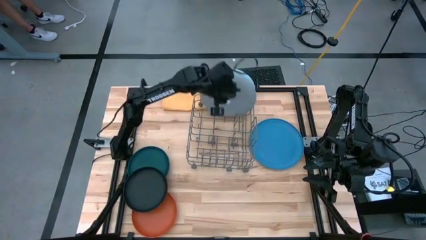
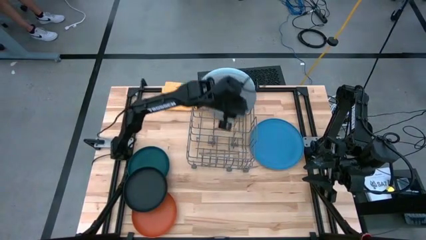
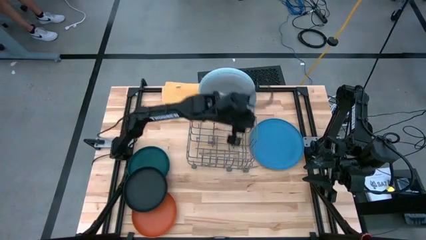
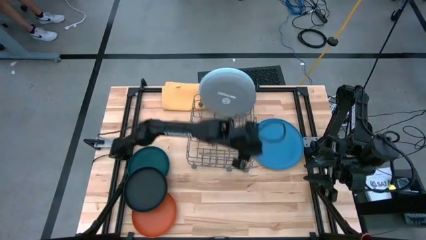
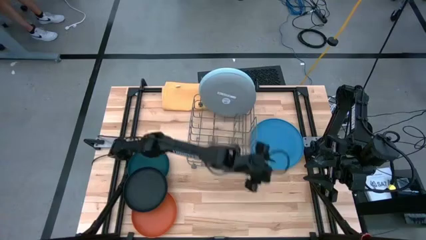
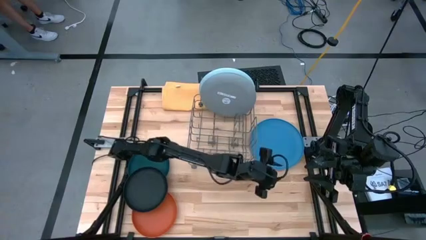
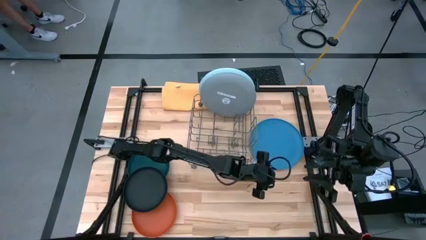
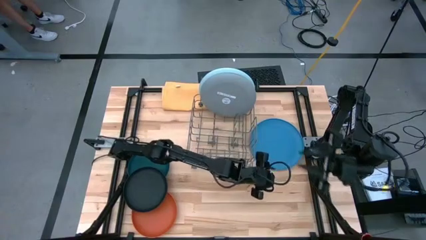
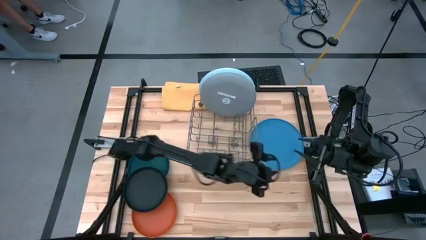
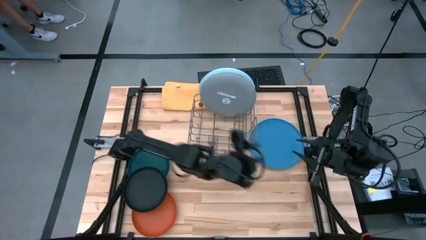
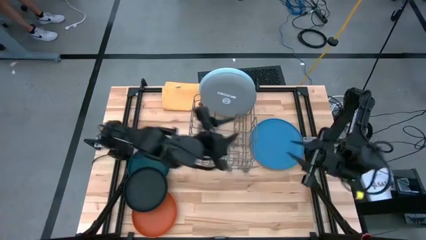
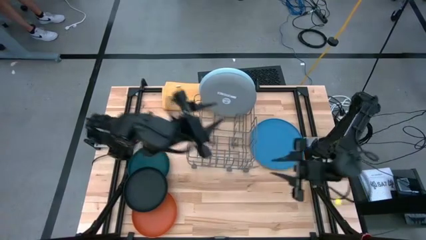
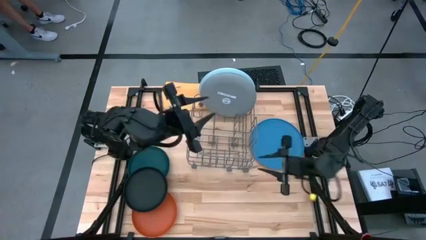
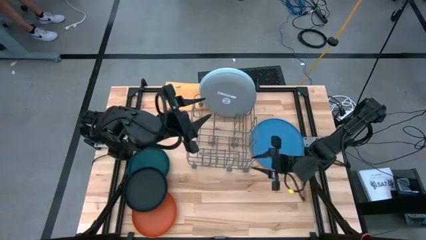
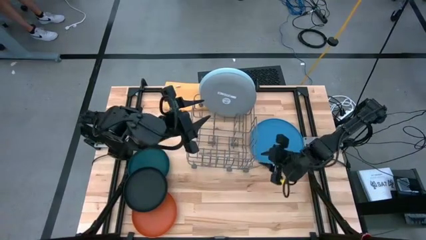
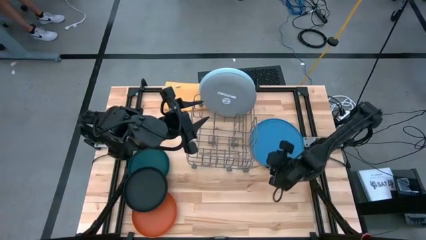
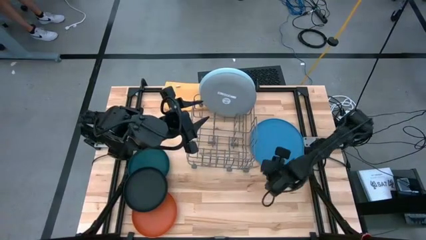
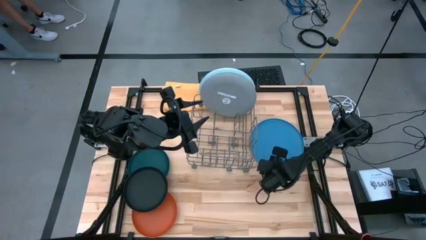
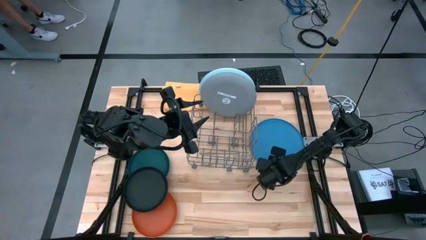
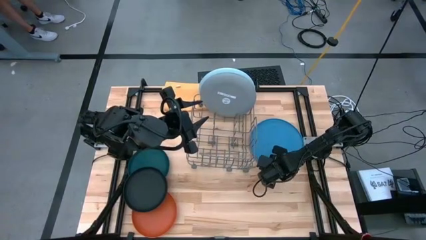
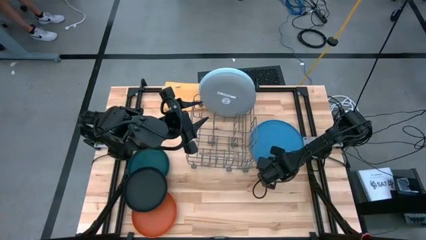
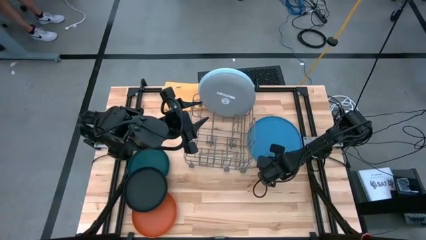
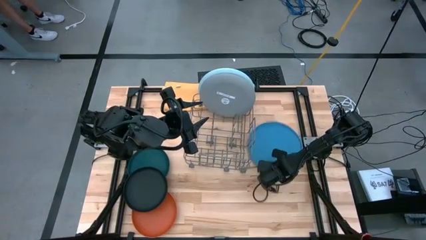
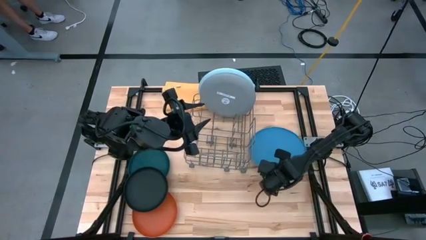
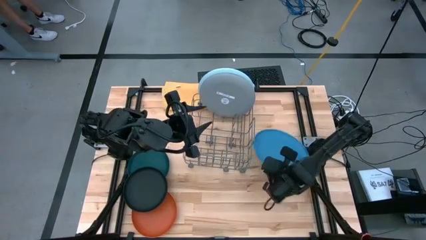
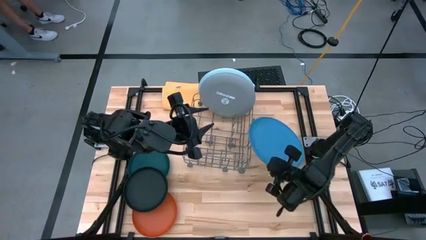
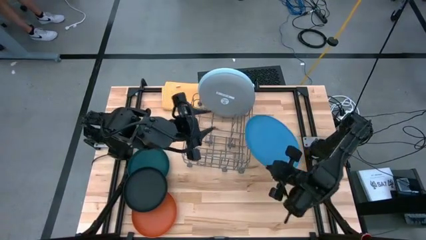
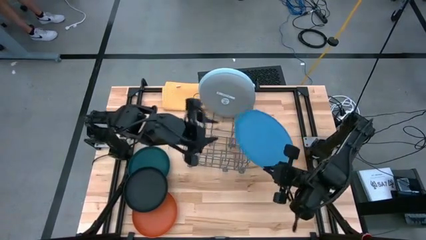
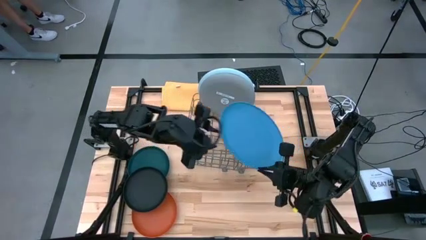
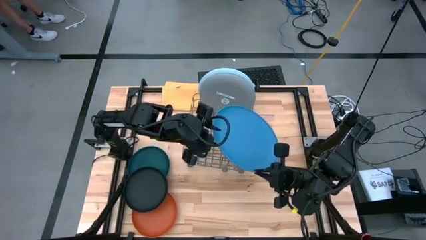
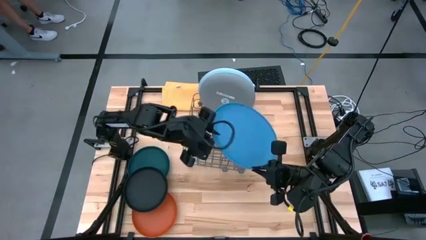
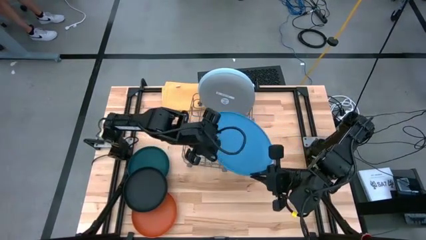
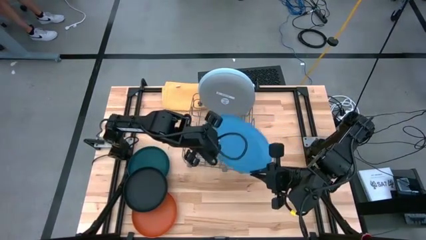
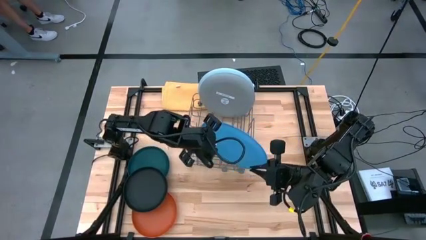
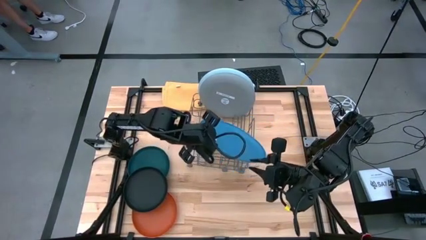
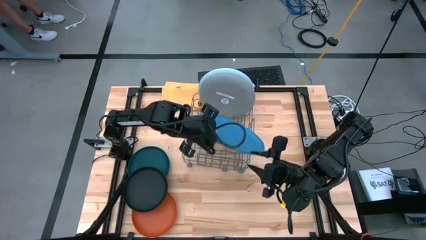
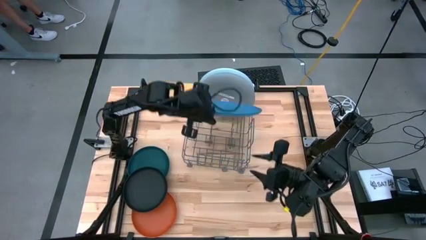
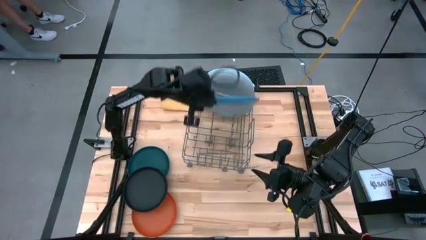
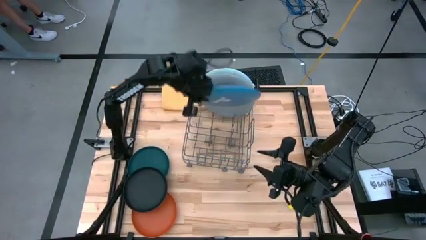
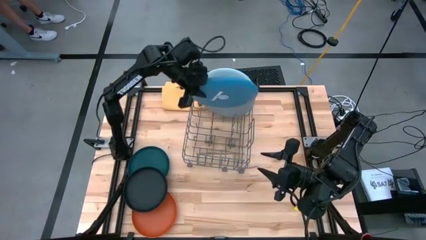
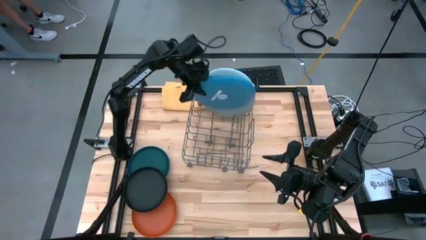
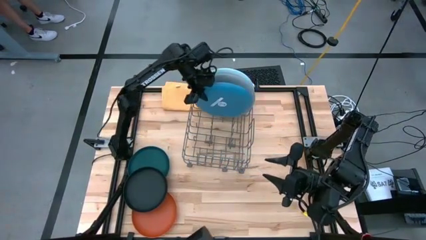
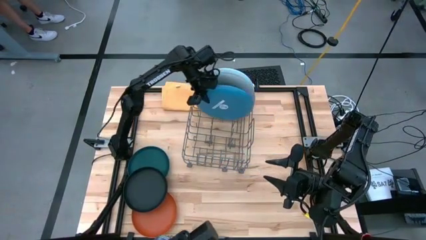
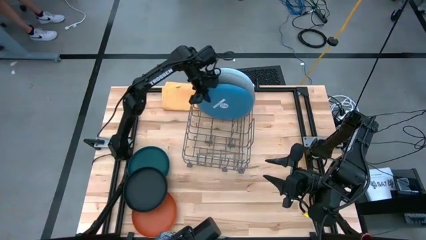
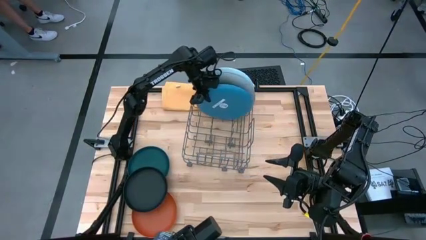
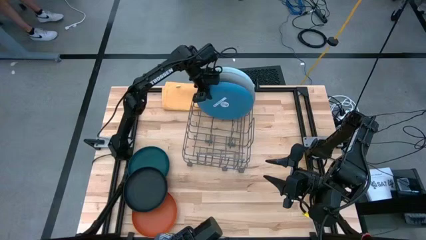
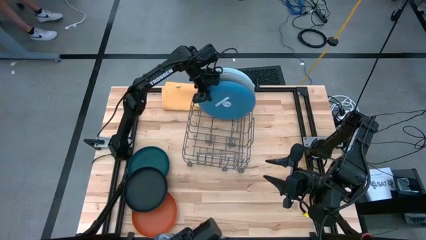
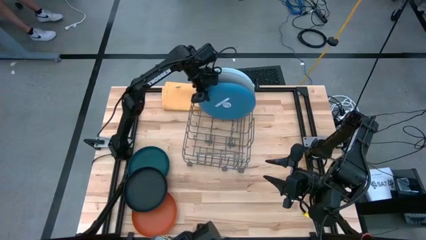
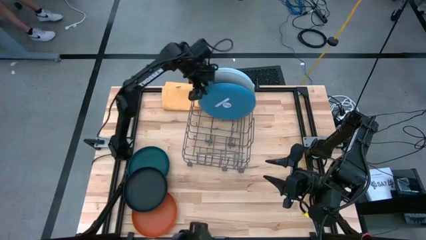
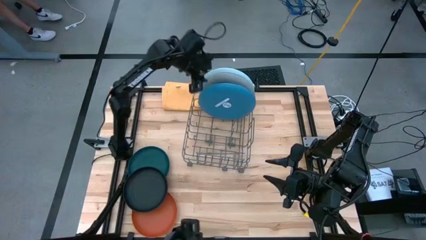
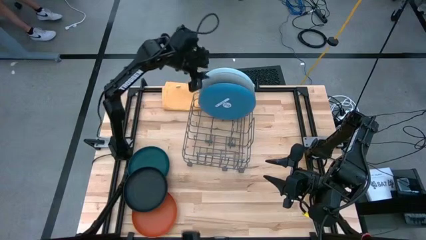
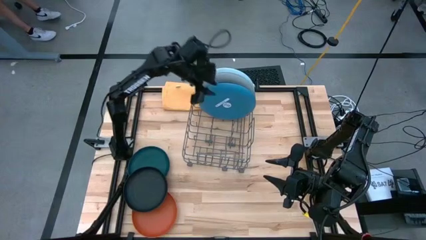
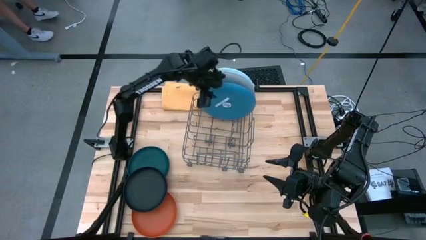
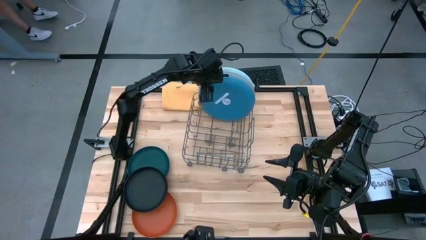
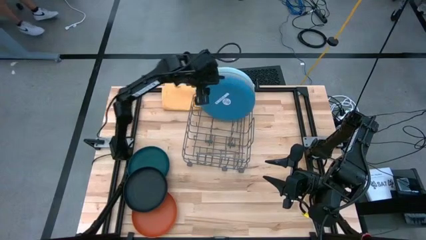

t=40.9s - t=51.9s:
Task: Sort dishes
Put the blue plate into the dish rack

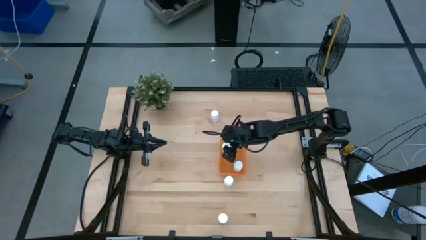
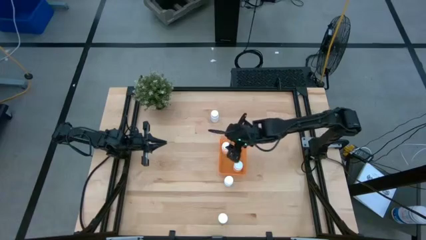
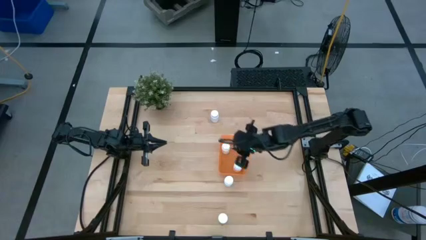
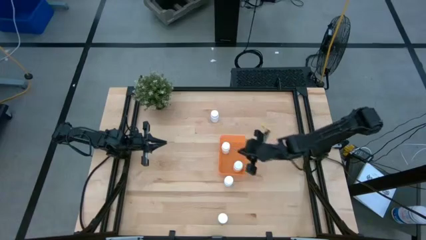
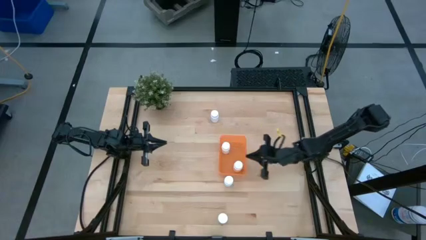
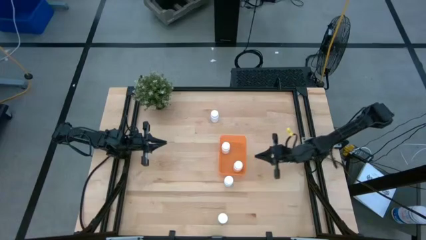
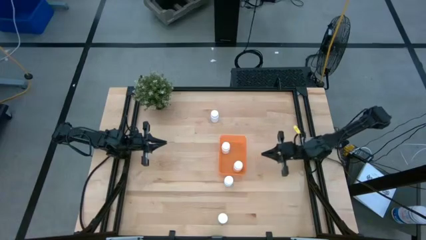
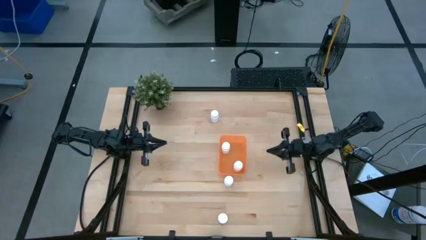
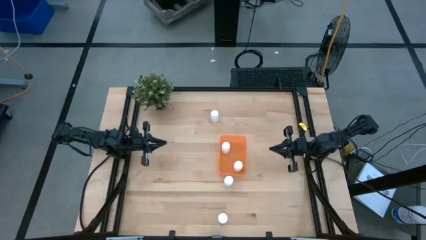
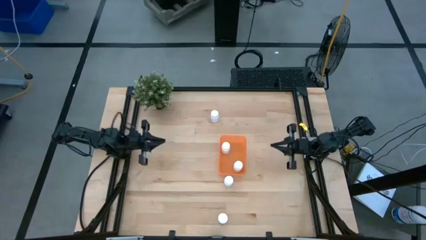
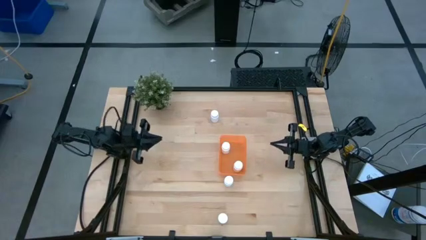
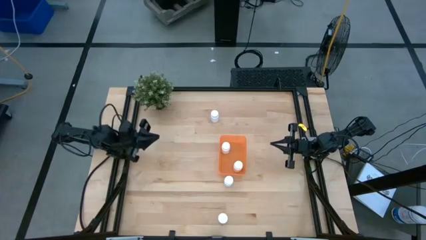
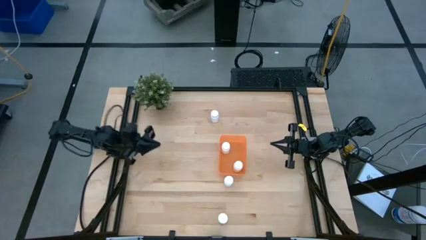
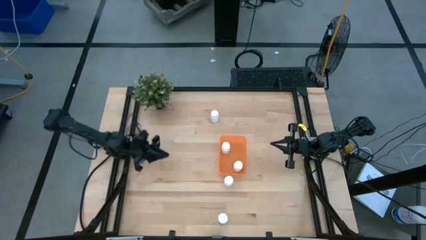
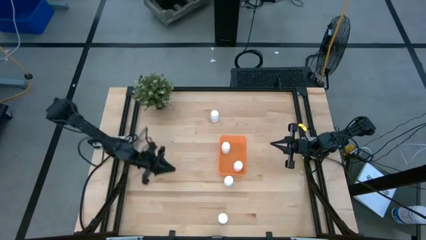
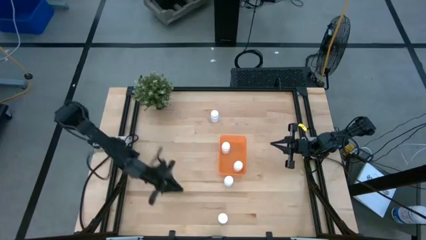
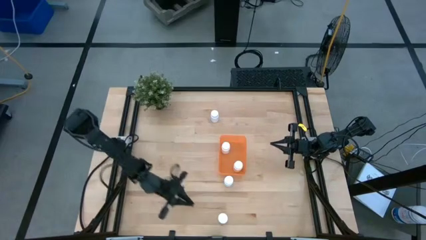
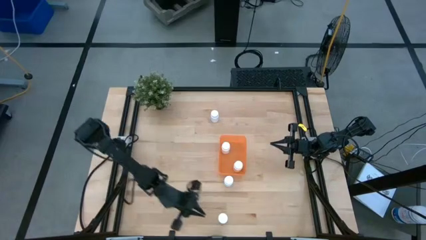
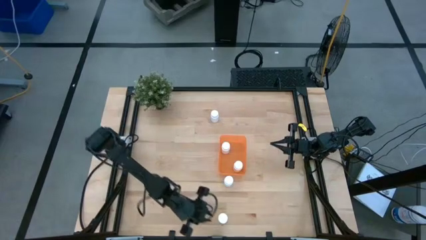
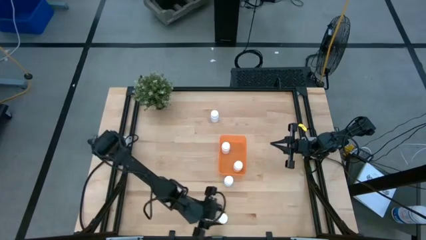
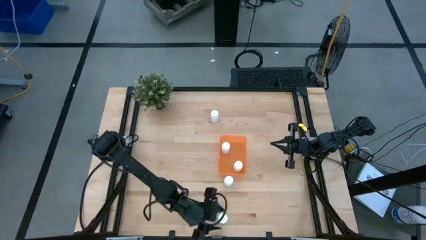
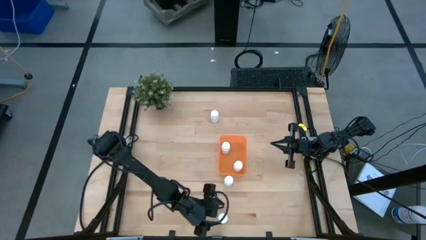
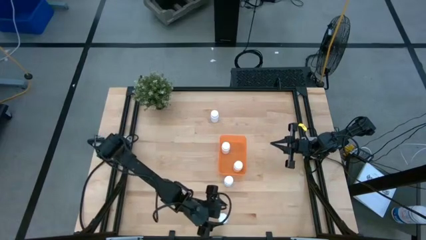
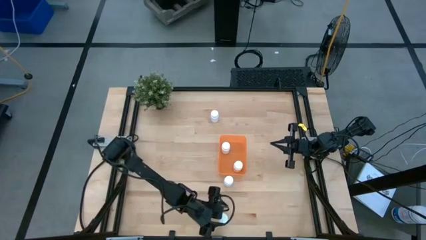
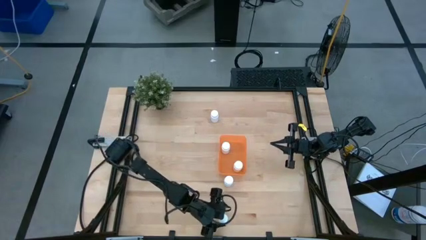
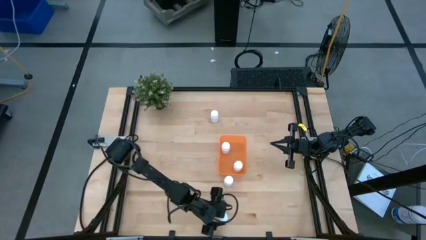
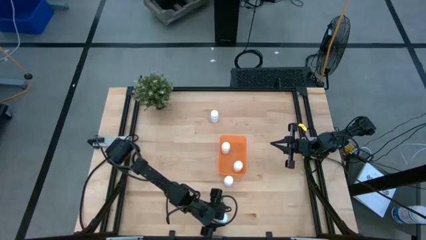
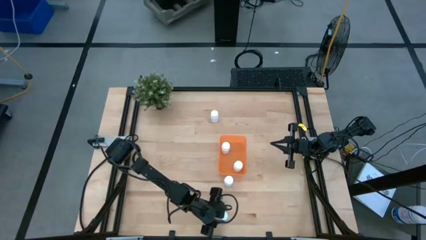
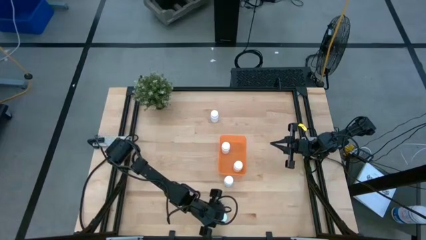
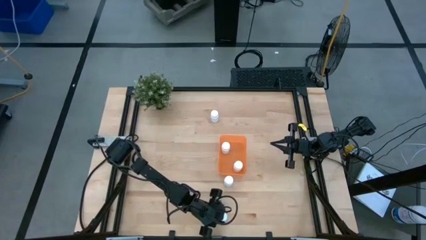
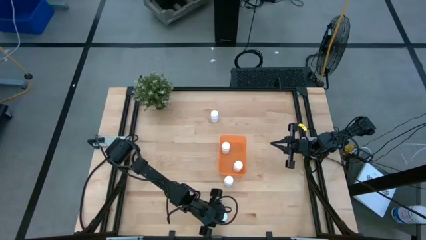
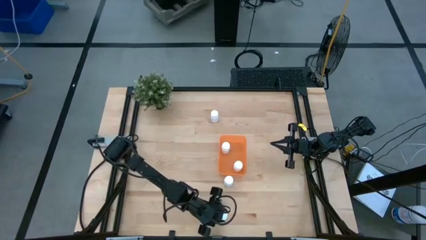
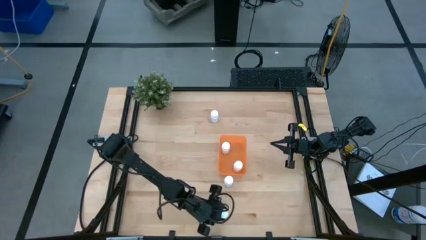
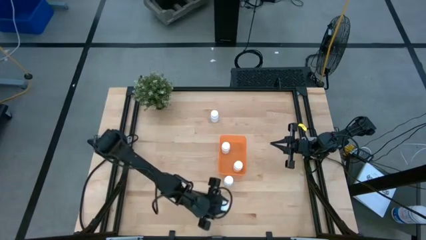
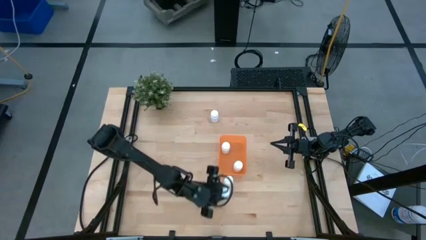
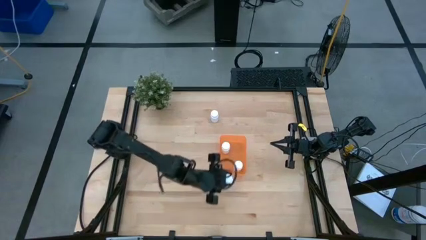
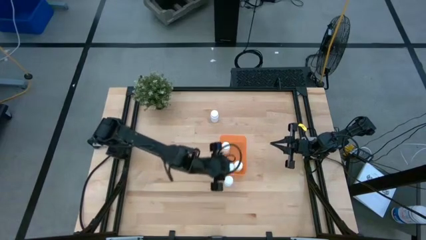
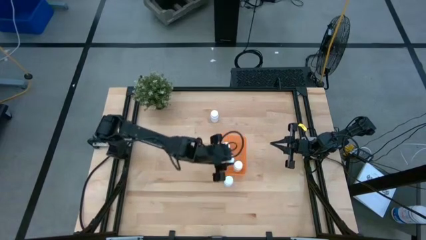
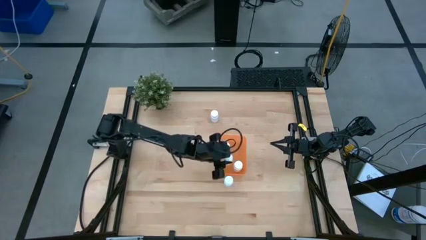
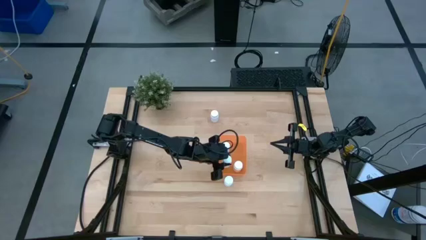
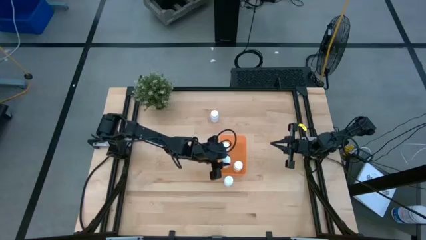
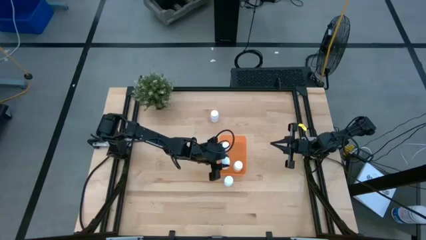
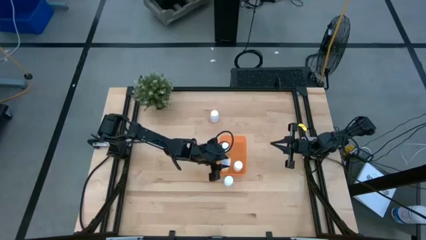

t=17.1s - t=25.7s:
Task: Pick and place pill bottles into a basket
Put the bottom white medicine bottle into the orange bin
